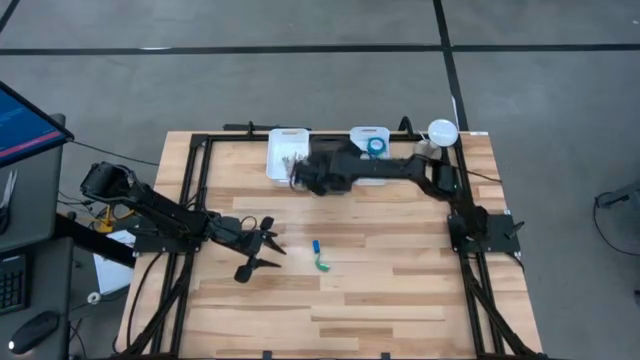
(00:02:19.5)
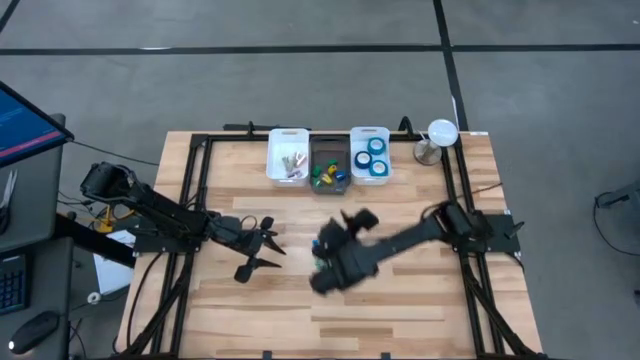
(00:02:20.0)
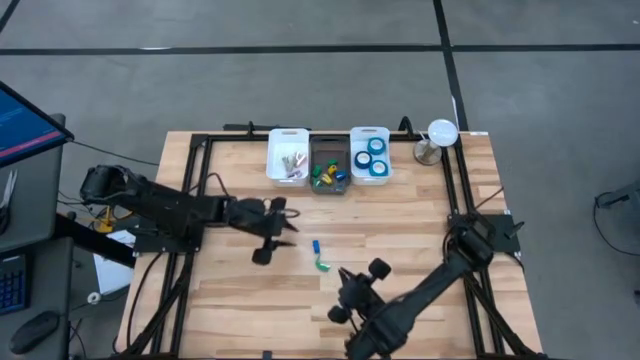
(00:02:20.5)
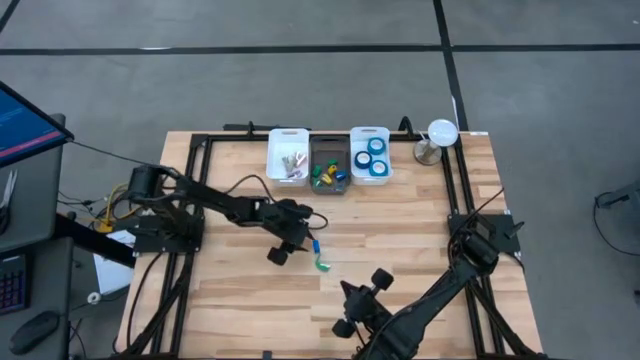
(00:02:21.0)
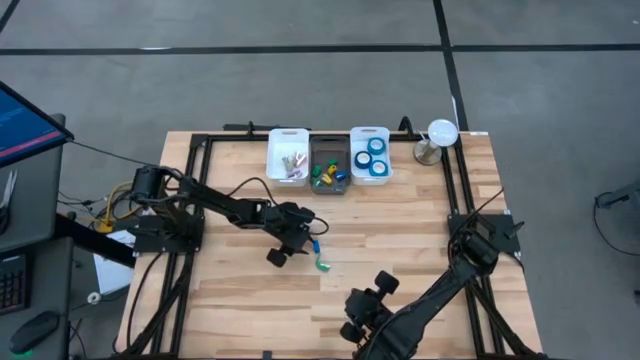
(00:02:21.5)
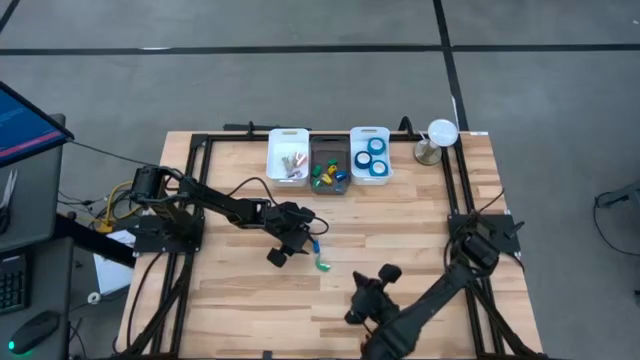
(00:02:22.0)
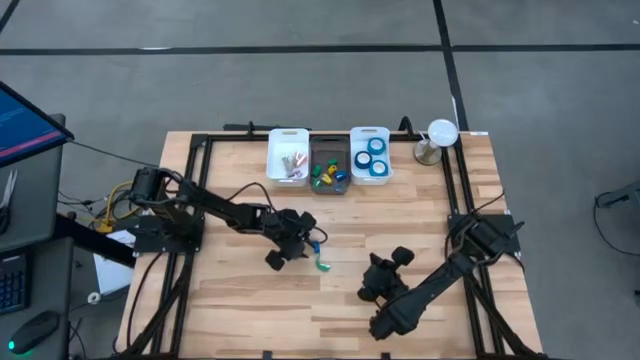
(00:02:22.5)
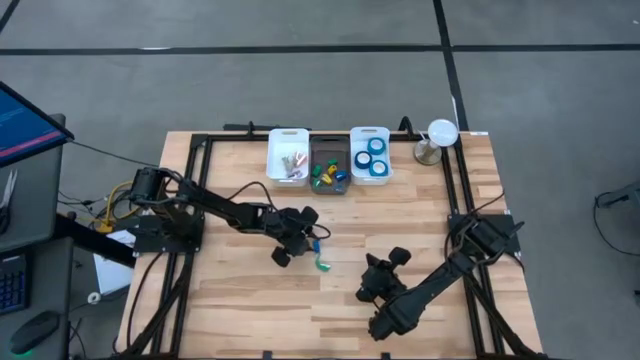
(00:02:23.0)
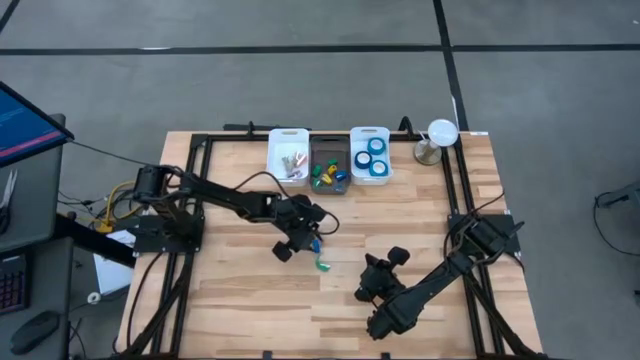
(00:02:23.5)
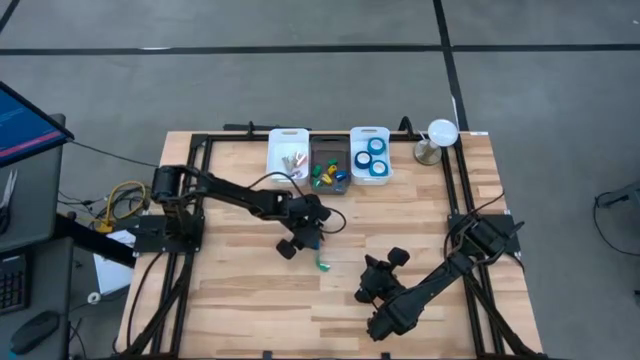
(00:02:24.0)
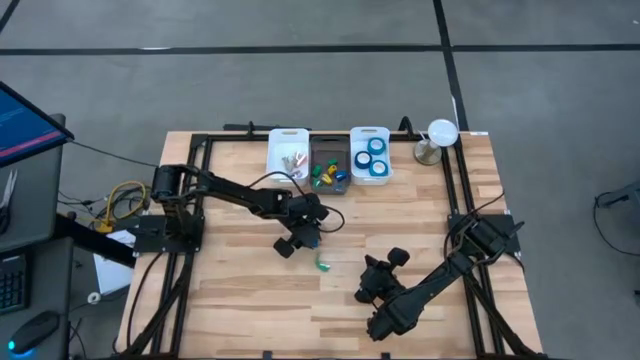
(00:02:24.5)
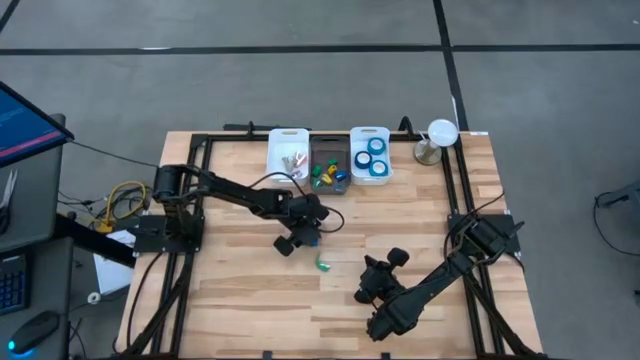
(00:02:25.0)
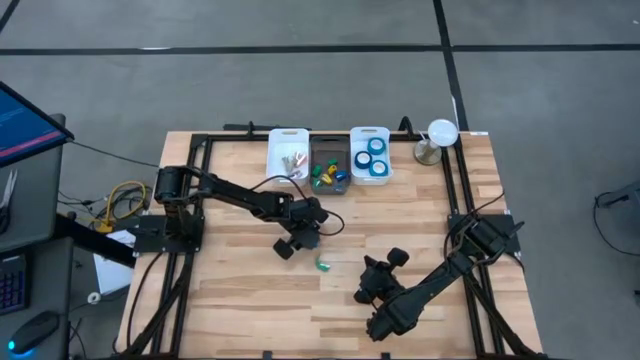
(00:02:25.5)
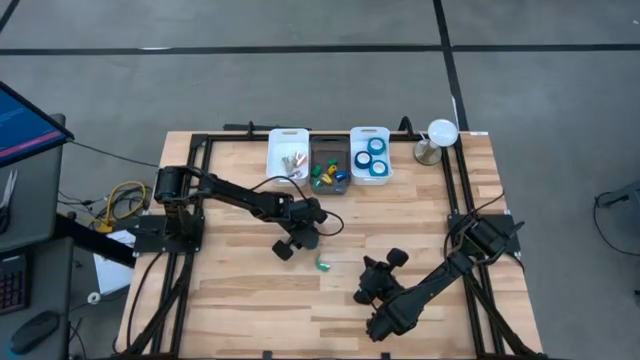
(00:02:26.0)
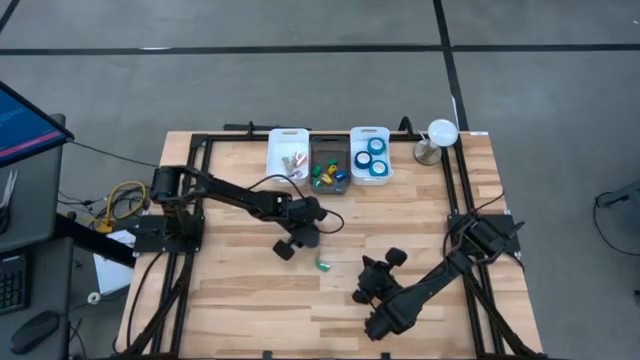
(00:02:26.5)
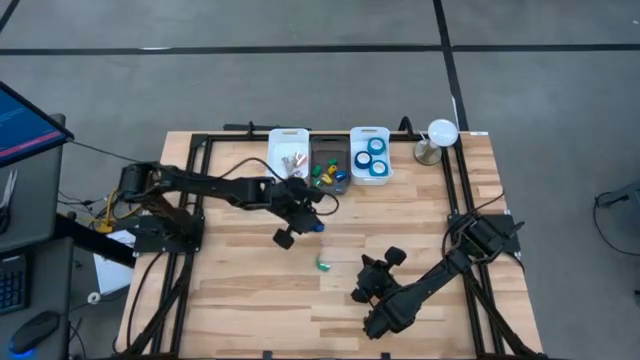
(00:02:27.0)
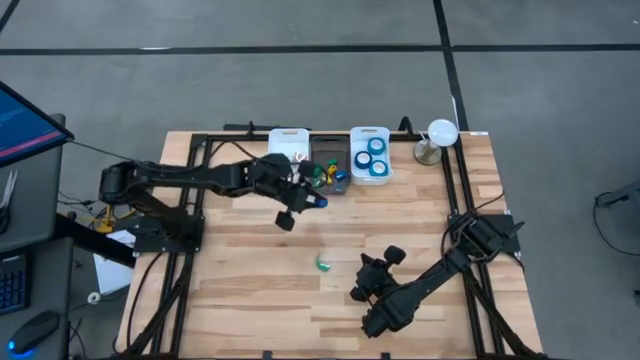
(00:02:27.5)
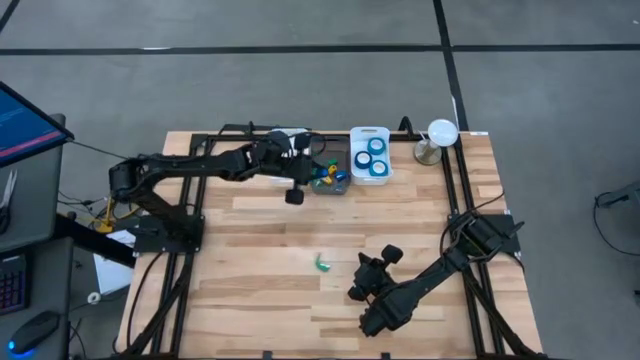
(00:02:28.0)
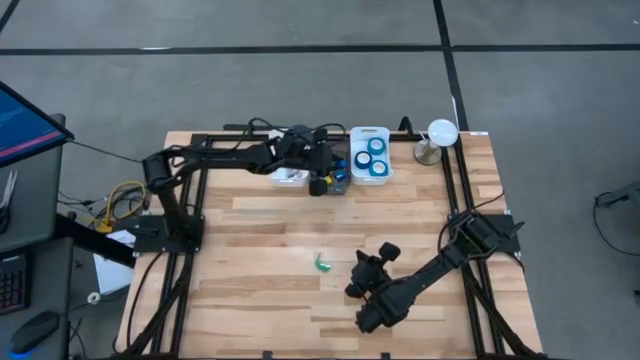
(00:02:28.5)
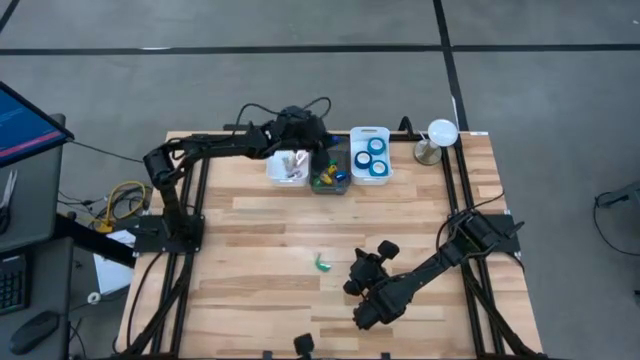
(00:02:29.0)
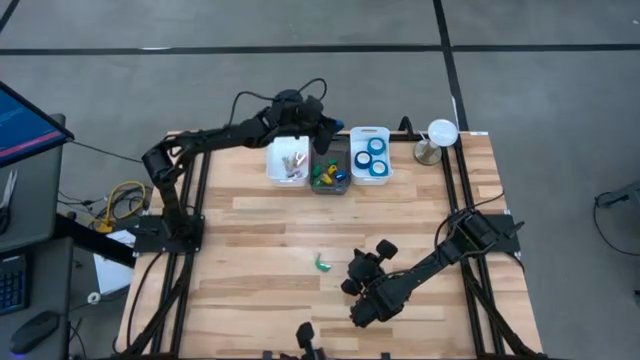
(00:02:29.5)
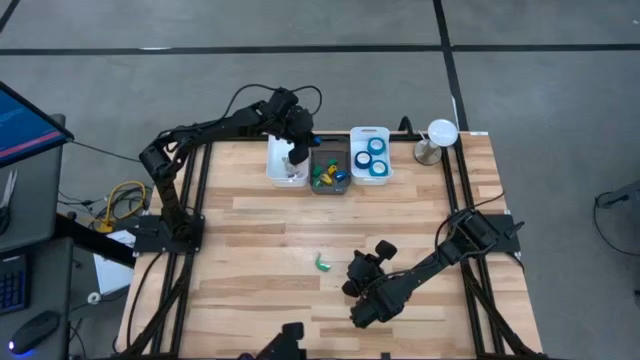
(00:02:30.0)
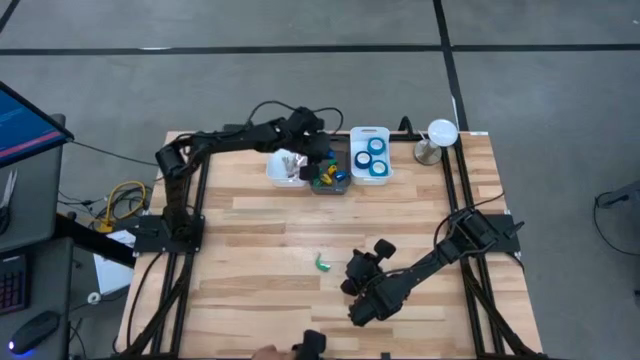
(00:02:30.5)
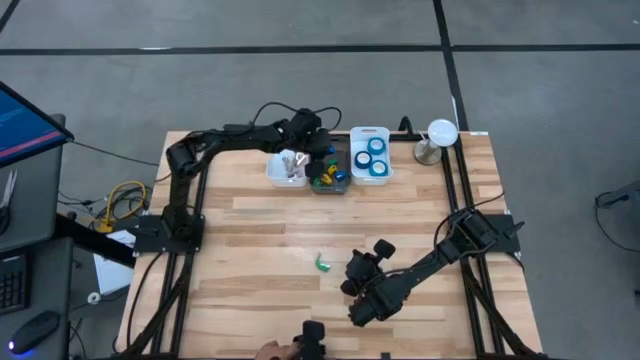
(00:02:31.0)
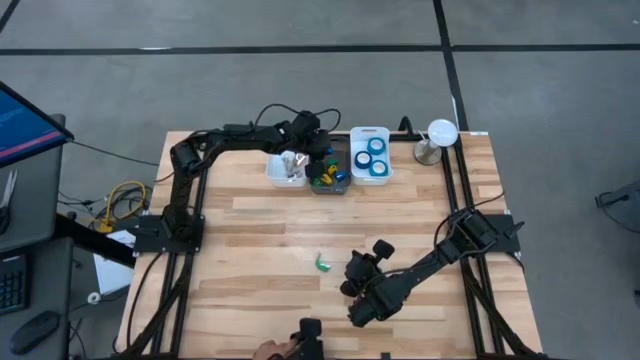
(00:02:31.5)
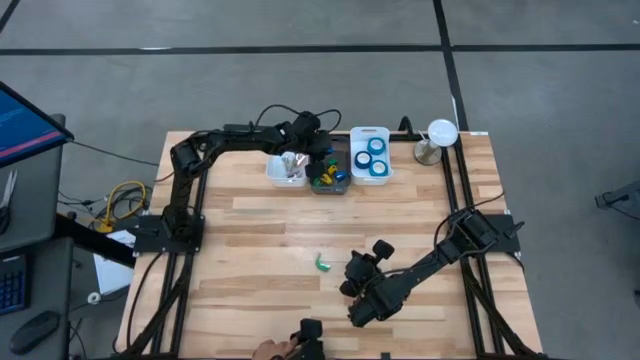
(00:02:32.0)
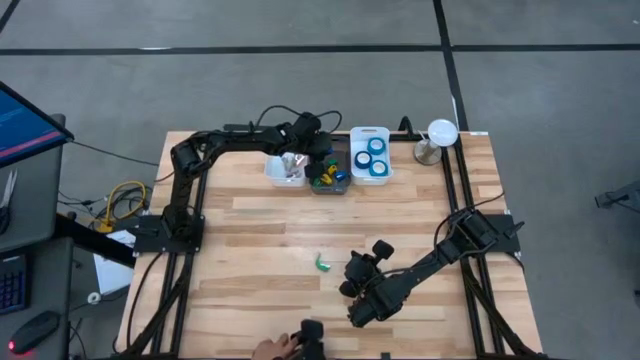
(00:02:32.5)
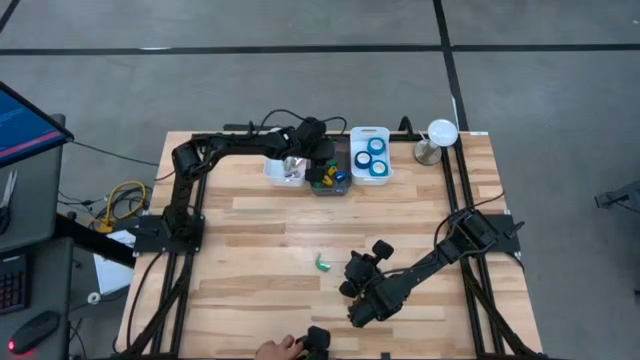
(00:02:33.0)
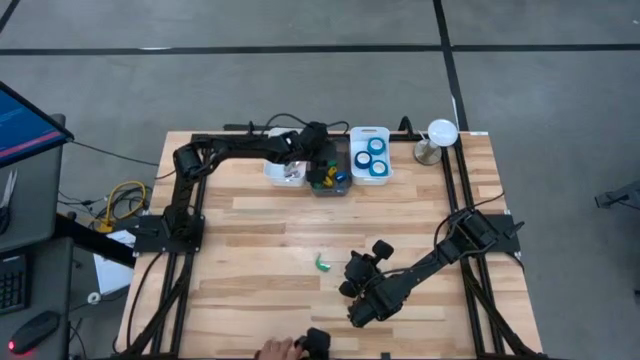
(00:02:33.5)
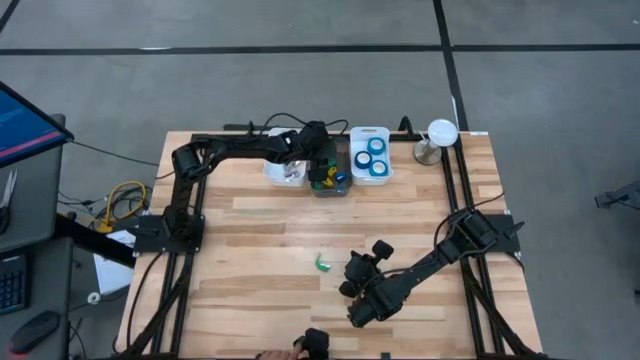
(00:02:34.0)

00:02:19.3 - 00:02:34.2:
Task: Pick and place Stapler, Stapler remover, tape
Put the blue stapler into the black bin

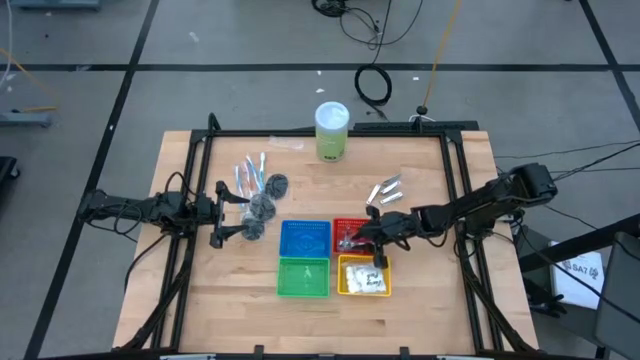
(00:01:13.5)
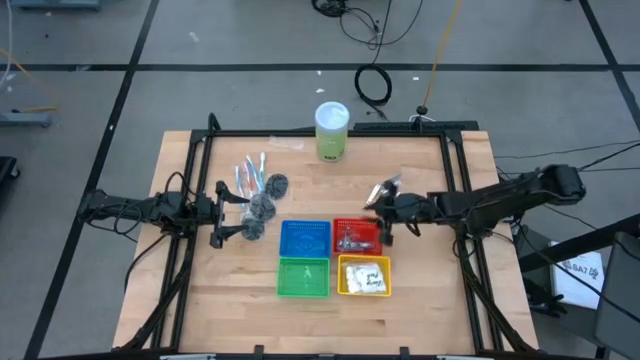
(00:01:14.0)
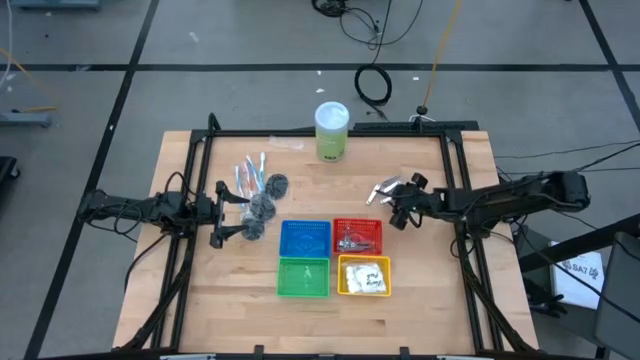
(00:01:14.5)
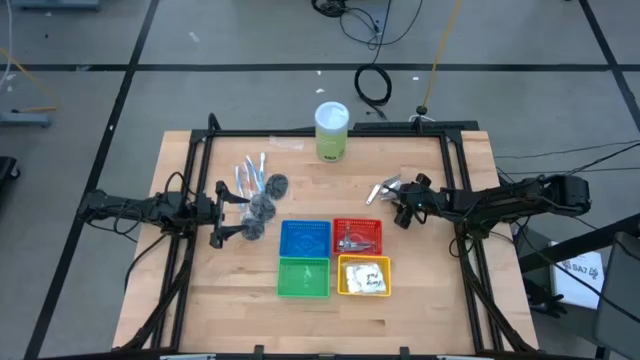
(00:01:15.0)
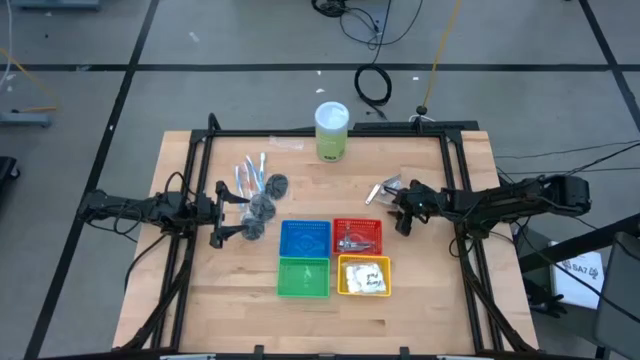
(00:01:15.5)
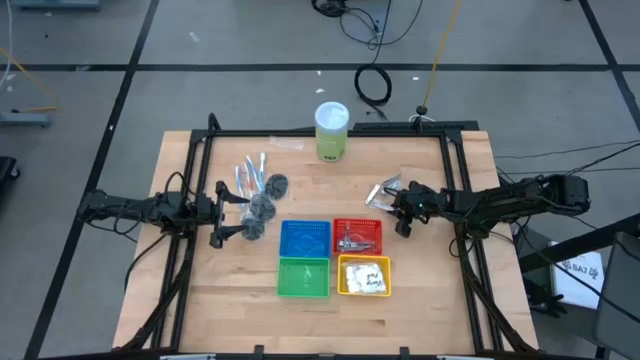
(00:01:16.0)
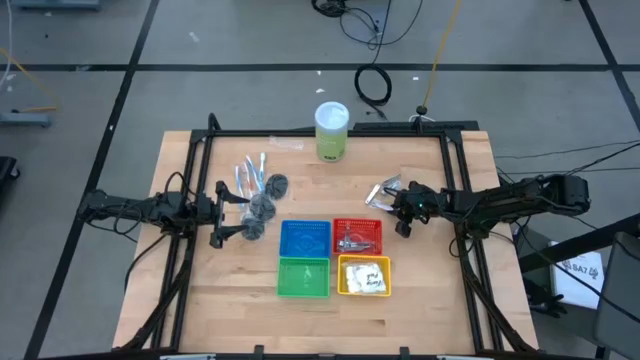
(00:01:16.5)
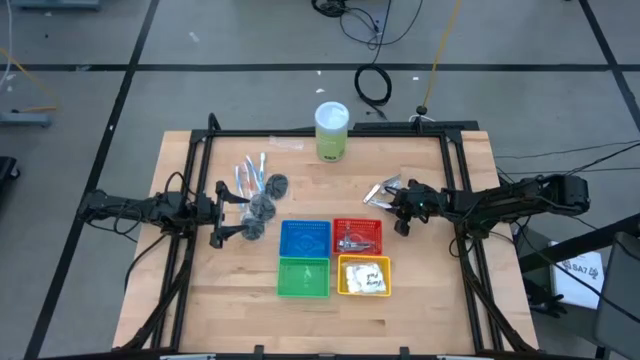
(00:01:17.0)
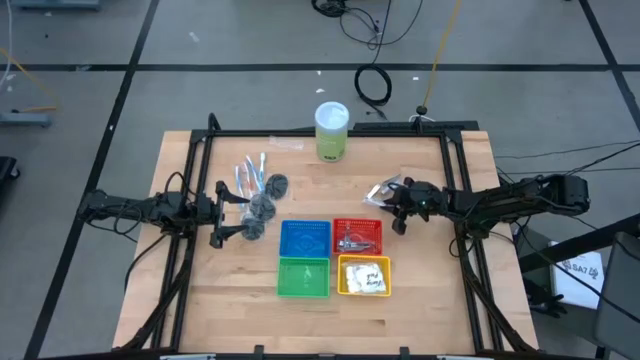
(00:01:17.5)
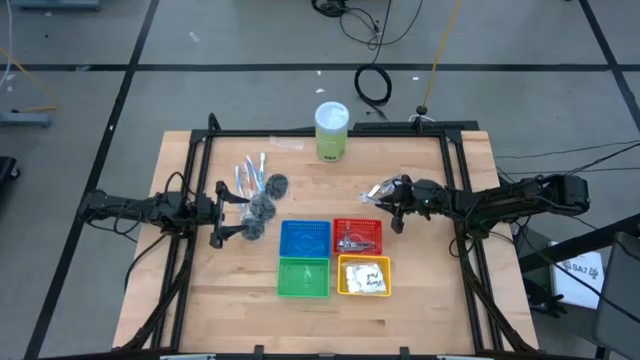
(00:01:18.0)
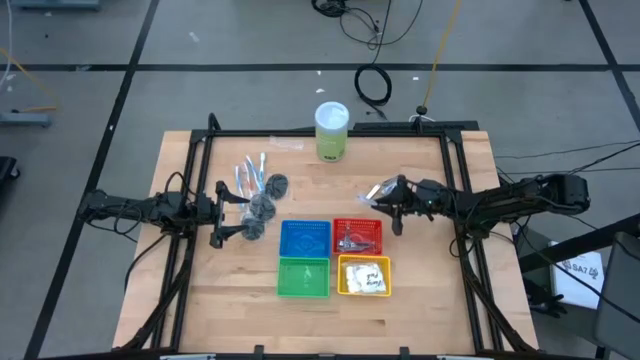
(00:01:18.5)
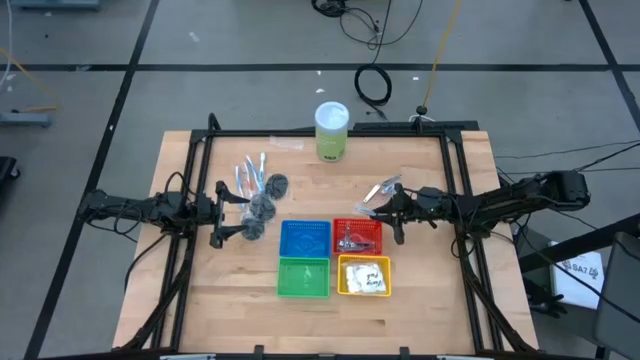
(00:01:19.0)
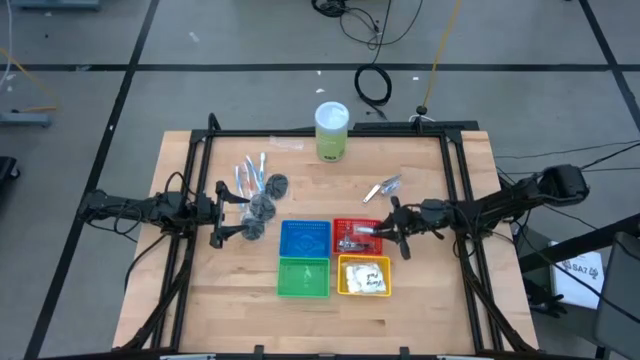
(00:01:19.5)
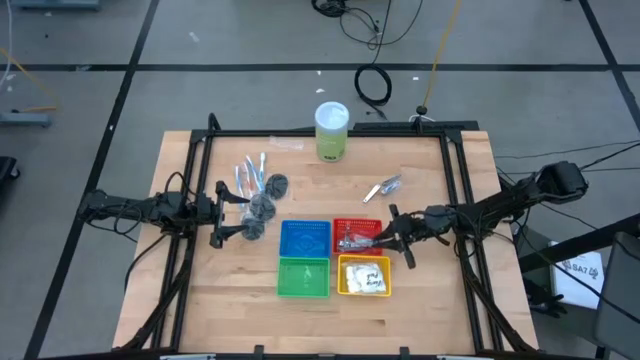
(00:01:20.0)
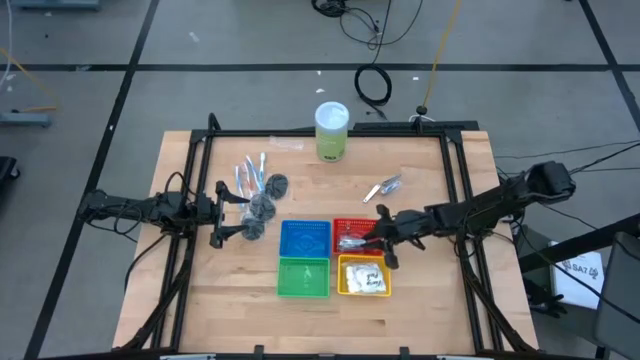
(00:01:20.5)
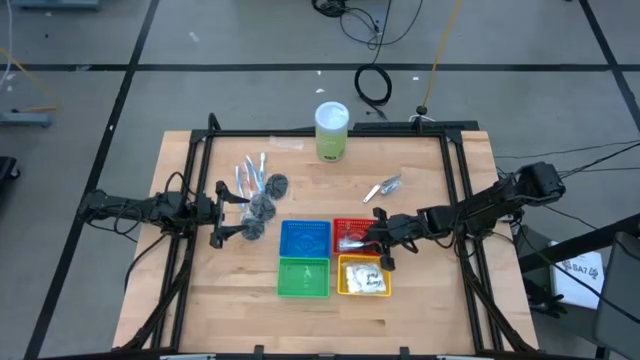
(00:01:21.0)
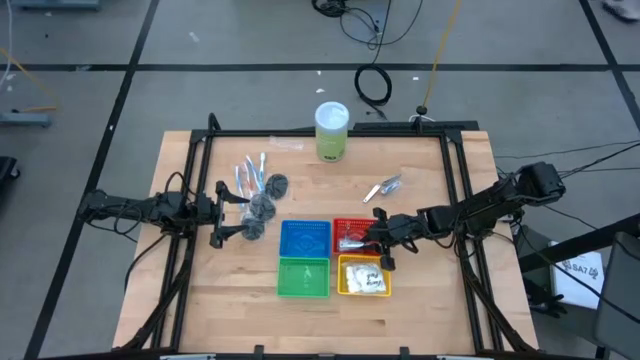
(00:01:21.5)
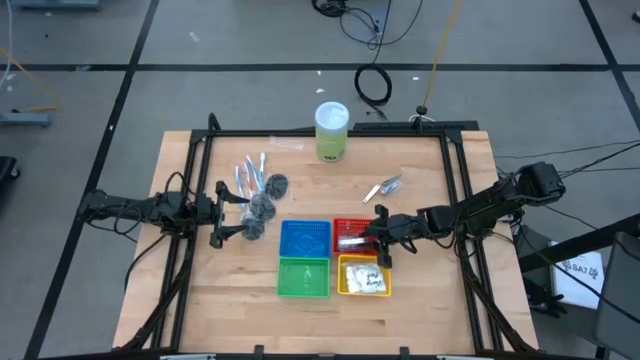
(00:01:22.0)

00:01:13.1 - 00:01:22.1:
Task: Pick & Place Travel size toiletries
Put the nail cutter into the red basket
